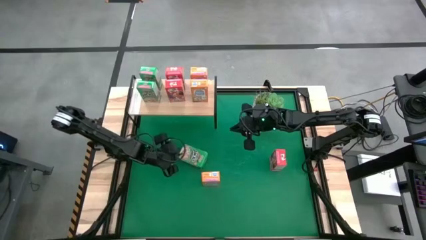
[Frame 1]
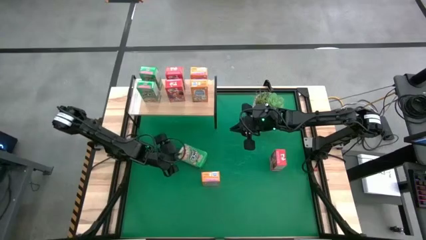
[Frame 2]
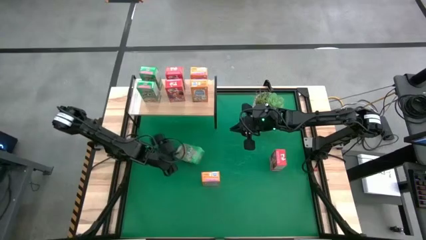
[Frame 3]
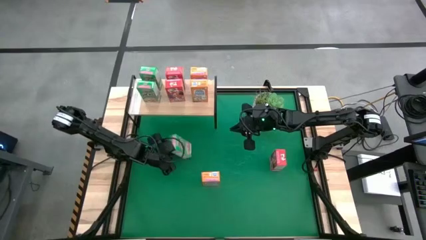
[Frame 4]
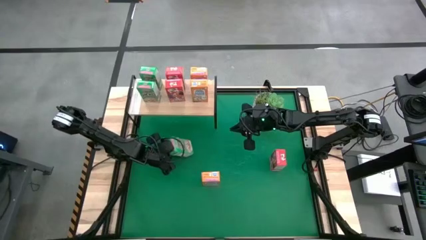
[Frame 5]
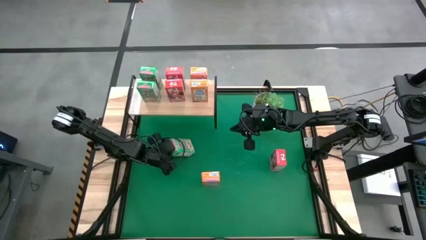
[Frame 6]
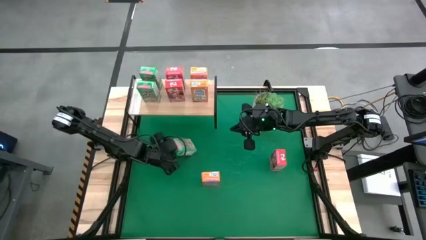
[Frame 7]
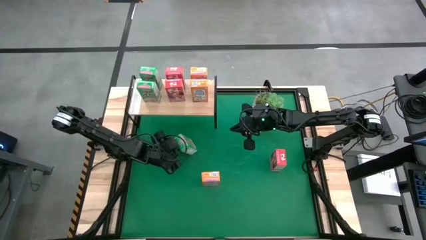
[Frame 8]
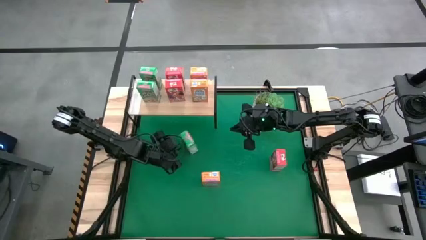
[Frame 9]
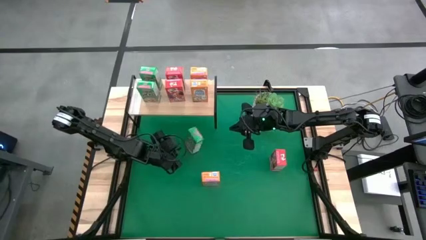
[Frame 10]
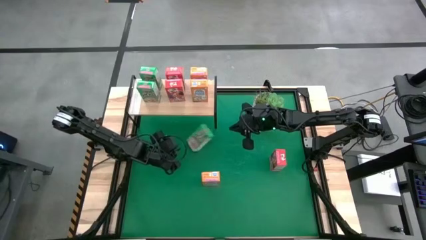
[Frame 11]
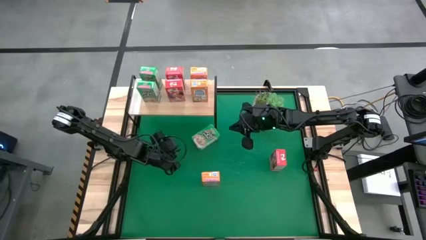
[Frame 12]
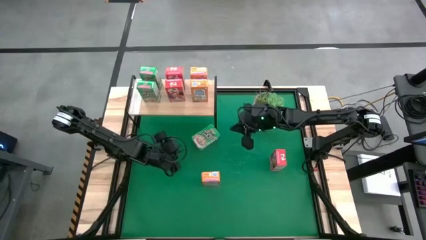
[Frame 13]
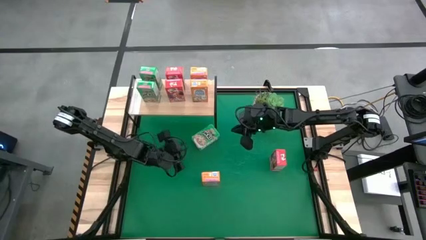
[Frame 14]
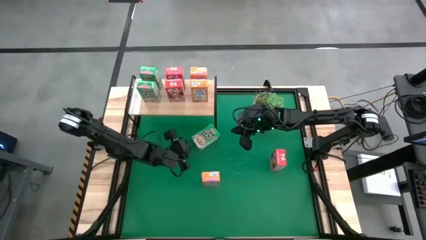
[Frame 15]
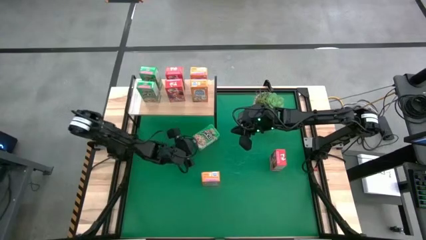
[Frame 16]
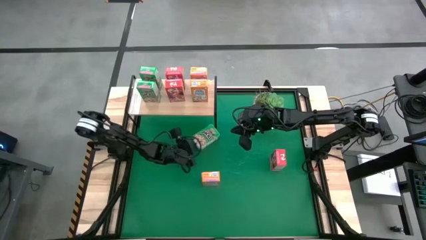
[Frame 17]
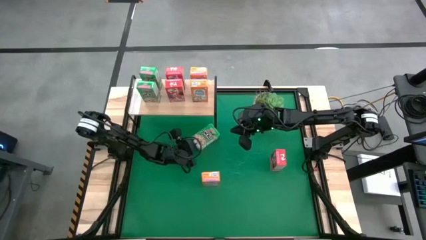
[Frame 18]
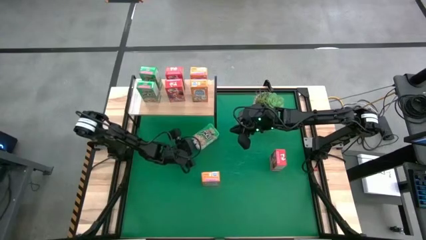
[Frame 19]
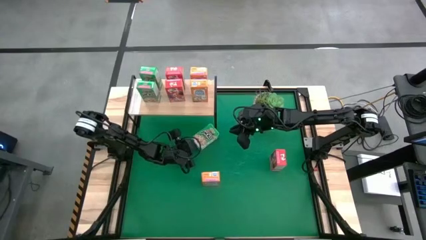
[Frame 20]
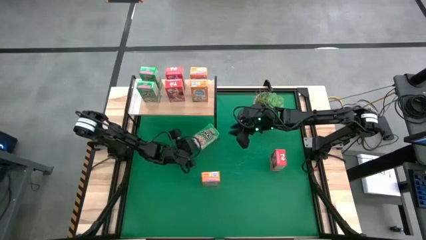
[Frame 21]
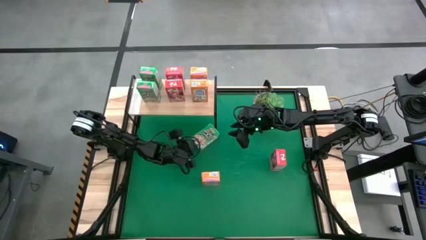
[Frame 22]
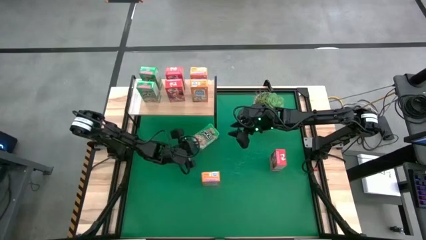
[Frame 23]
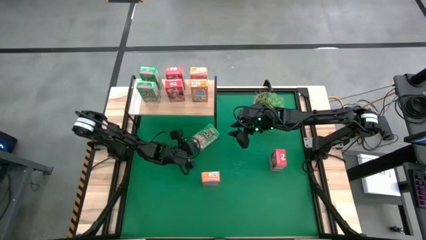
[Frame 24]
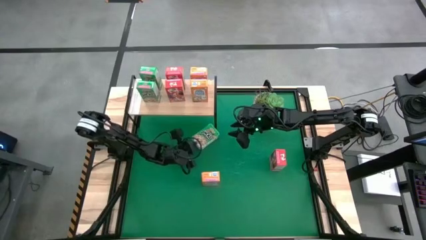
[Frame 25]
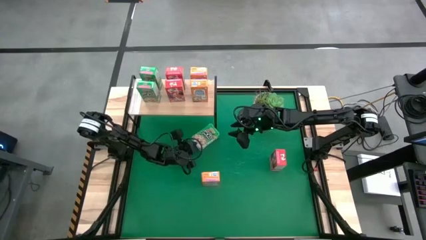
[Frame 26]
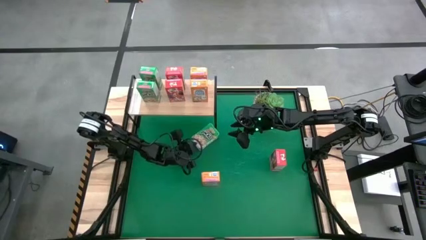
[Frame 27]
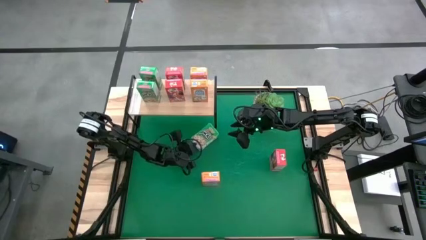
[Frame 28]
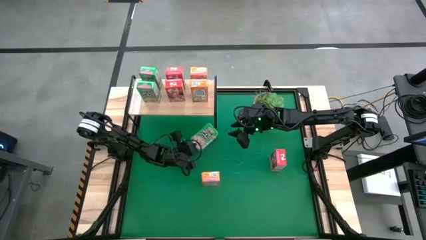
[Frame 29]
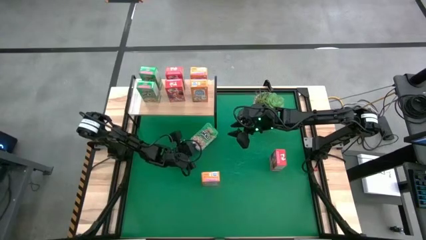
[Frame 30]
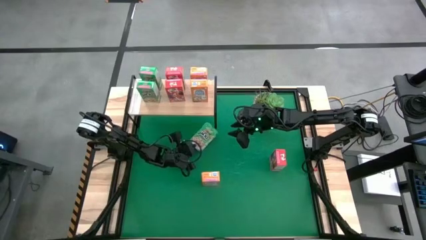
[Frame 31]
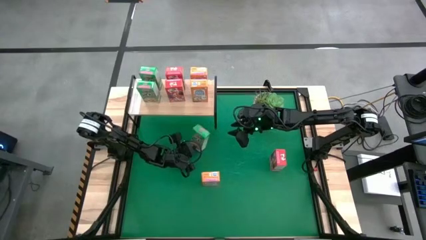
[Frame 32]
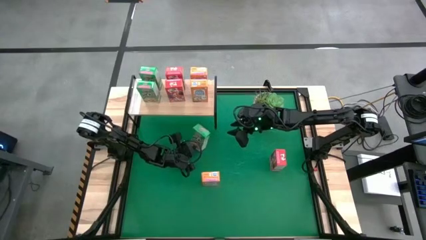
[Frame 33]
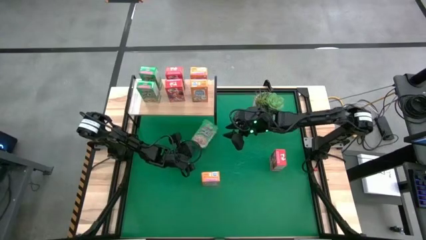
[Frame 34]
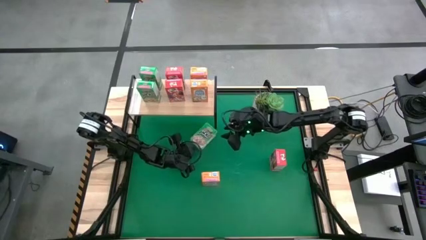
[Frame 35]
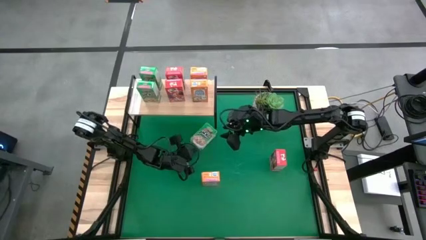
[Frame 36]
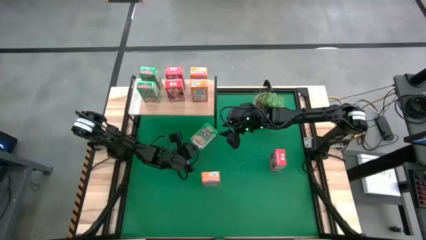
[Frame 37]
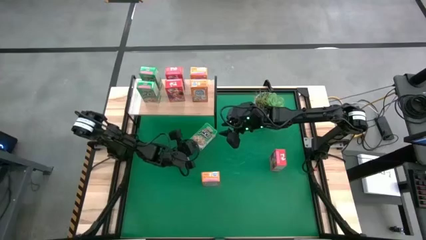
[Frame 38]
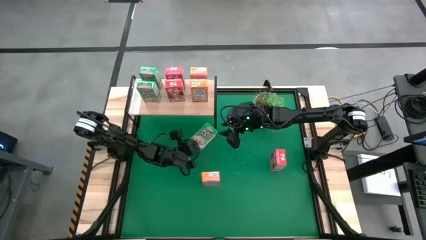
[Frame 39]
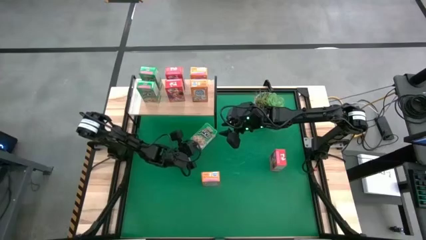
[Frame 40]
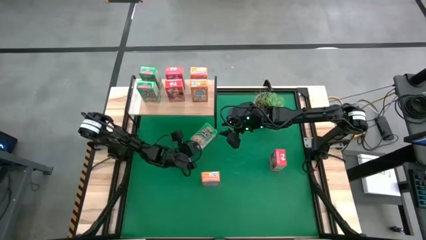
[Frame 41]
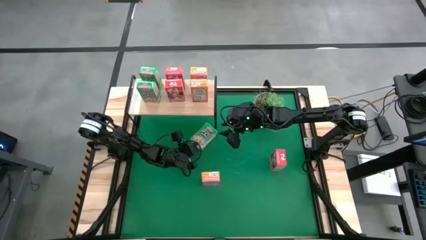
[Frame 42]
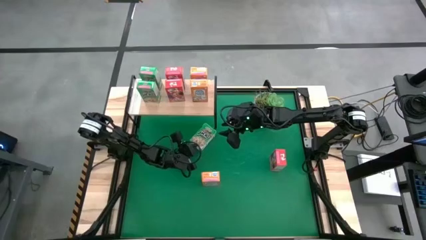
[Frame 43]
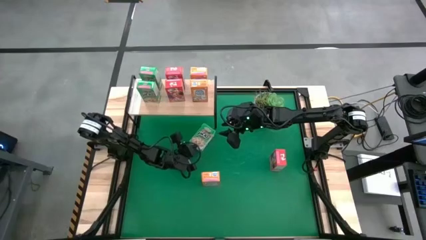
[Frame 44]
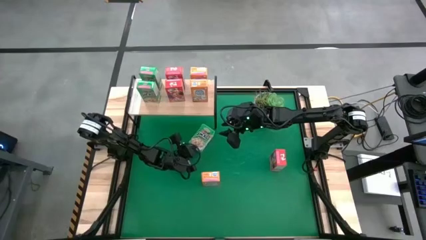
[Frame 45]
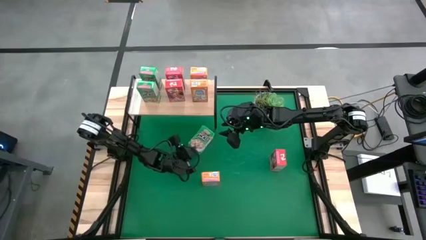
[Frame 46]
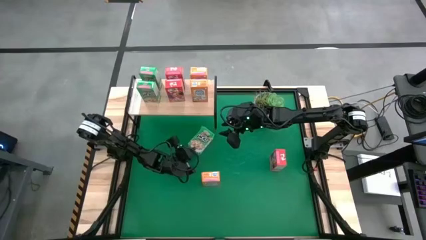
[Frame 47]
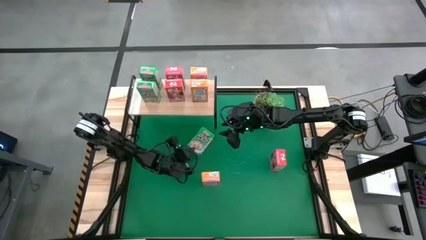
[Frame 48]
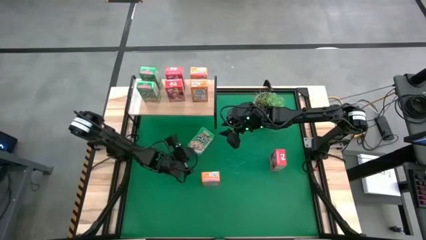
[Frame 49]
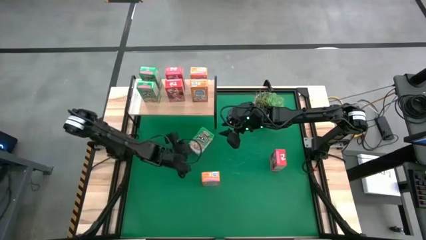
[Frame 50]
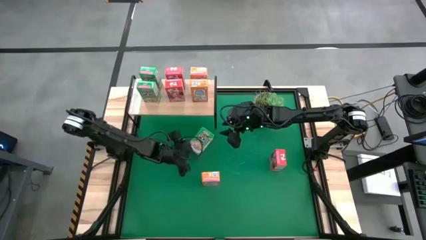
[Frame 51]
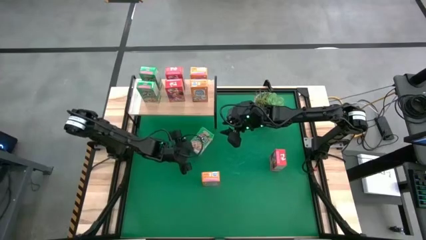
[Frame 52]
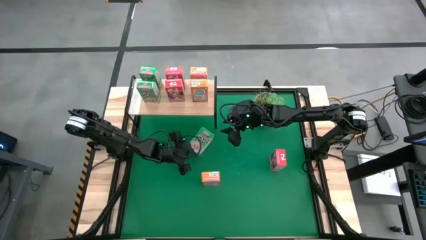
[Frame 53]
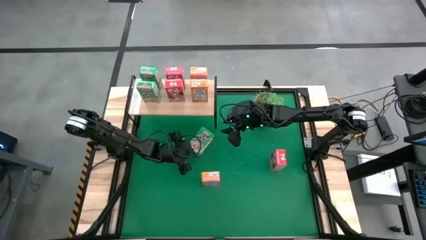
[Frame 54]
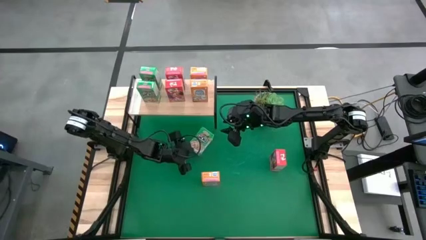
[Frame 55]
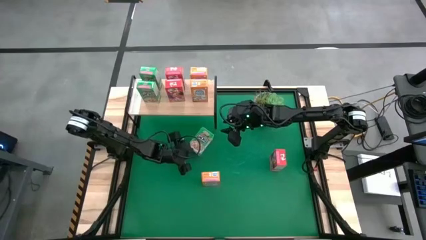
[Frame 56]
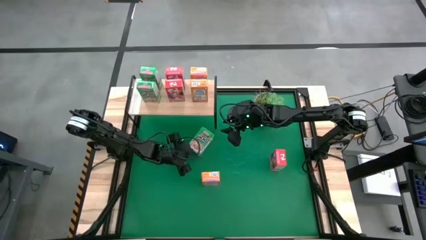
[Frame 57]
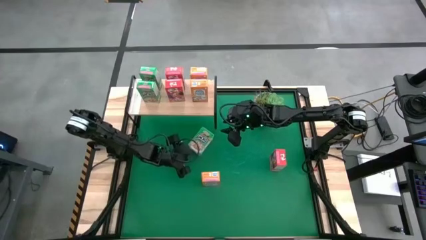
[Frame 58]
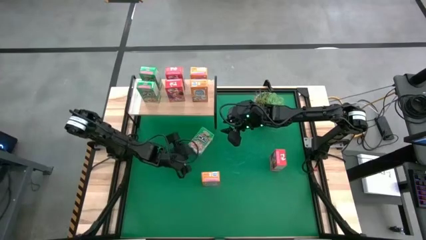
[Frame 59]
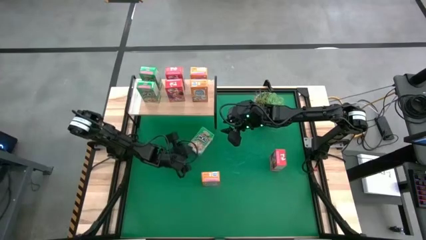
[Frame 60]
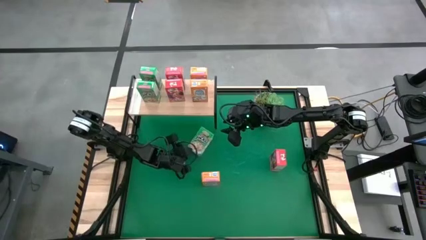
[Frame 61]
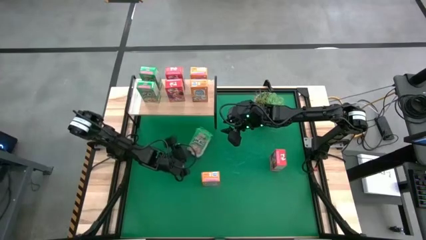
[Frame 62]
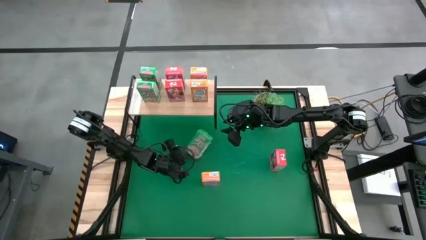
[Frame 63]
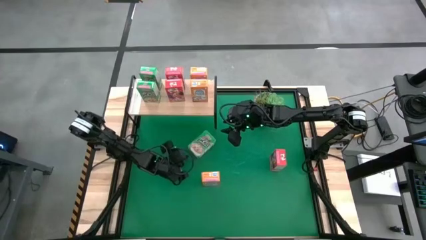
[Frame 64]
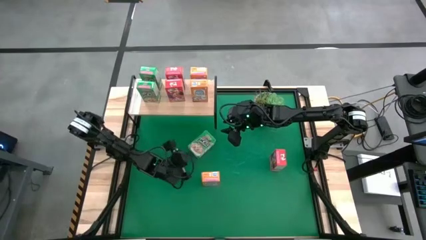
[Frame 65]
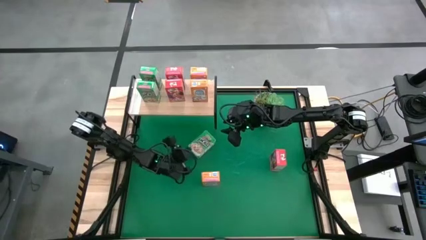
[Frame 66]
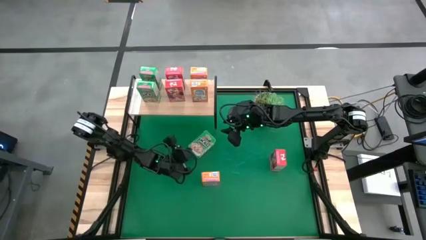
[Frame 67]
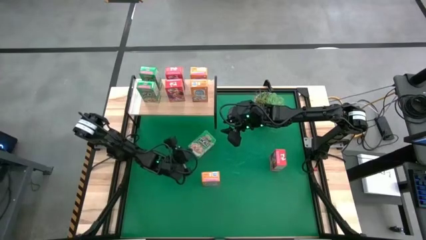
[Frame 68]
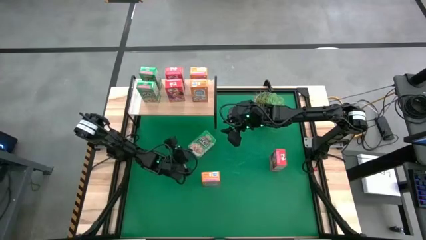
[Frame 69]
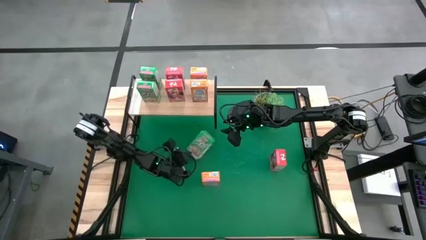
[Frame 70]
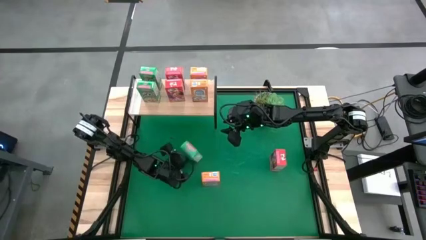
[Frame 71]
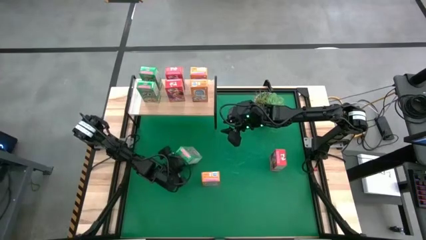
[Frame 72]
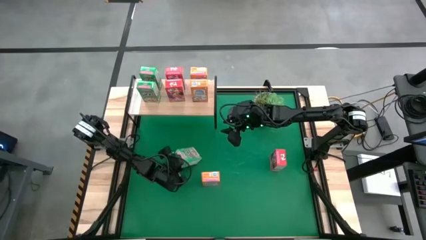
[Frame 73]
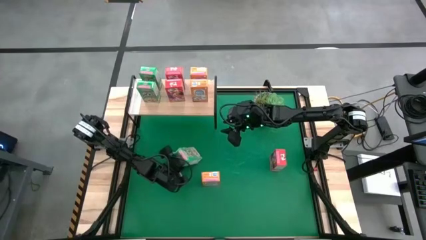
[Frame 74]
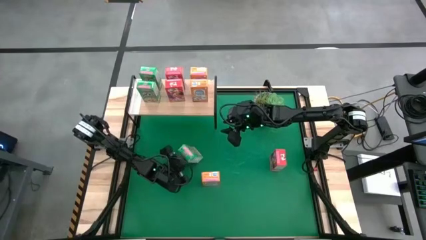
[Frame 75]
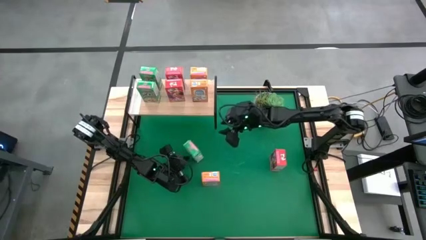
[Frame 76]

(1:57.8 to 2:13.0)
Task: Stack cereal on shelf
Put the green cereal box on the shelf aligned with other green cereal boxes

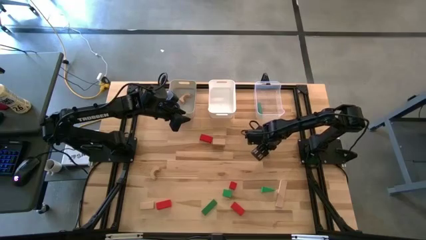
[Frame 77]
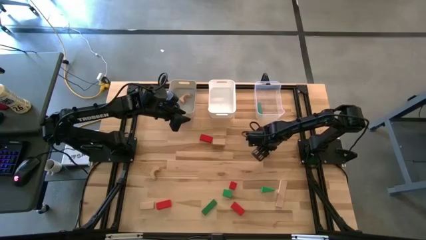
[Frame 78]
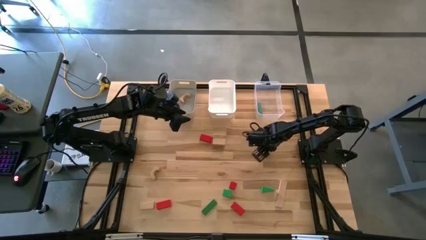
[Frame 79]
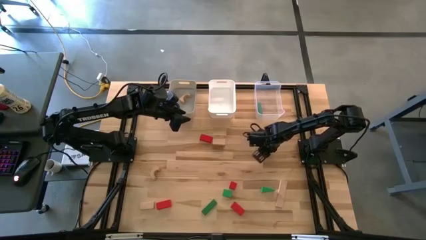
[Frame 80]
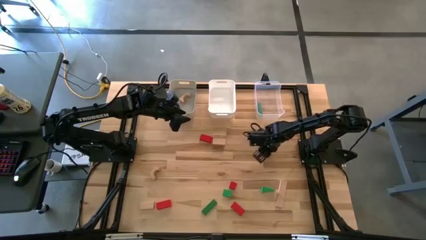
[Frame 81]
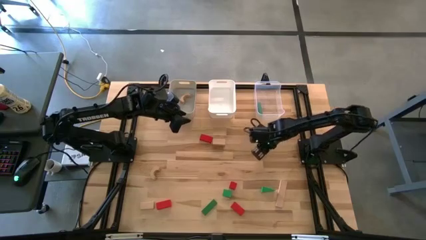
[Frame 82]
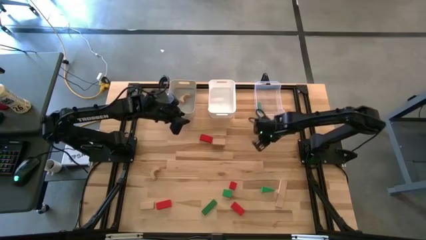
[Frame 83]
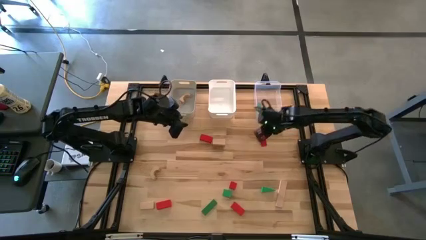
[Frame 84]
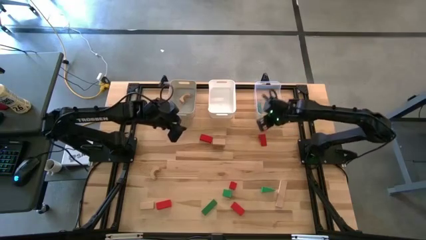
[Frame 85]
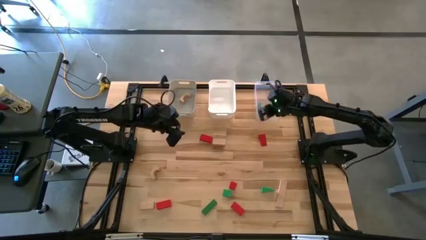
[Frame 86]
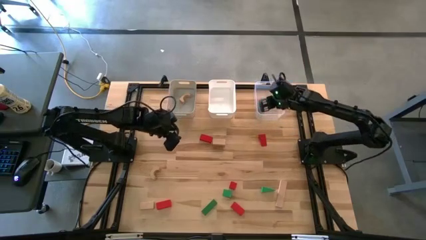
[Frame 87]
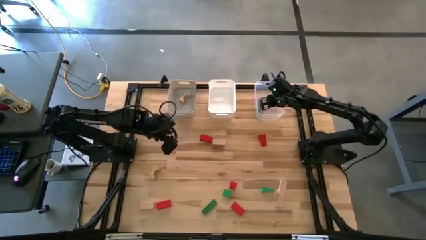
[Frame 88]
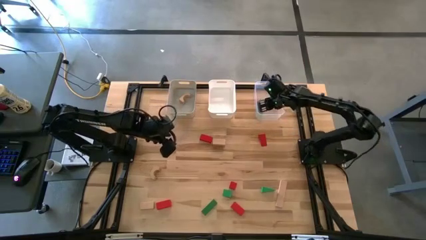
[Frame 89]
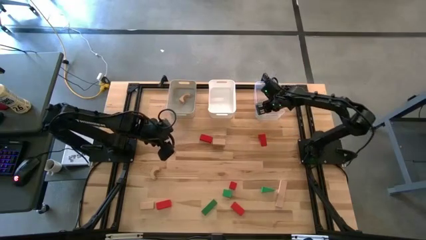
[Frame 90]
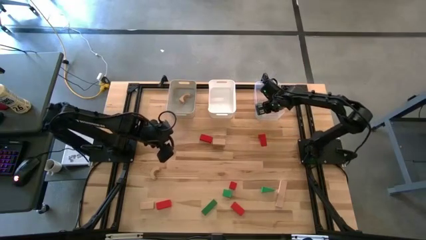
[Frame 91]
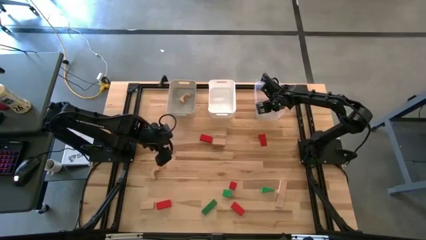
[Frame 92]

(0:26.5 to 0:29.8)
Task: Sort & place blocks by color
Put the green block into the transparent bin
